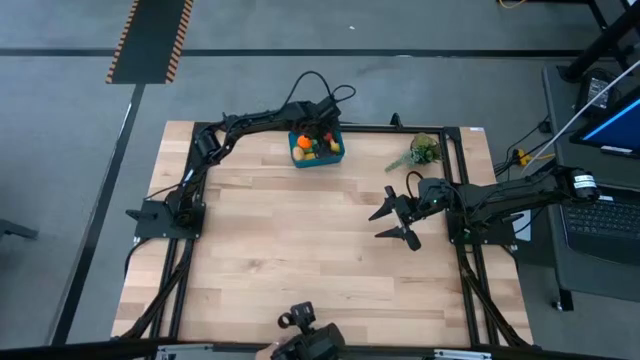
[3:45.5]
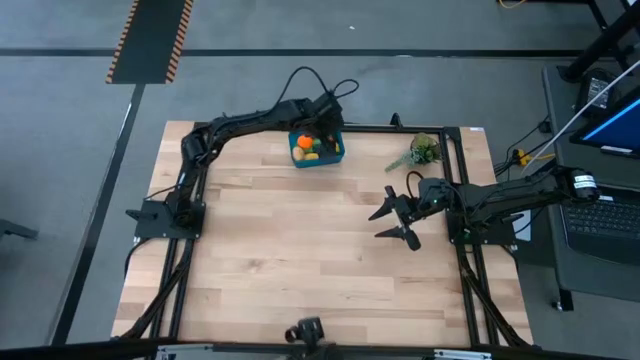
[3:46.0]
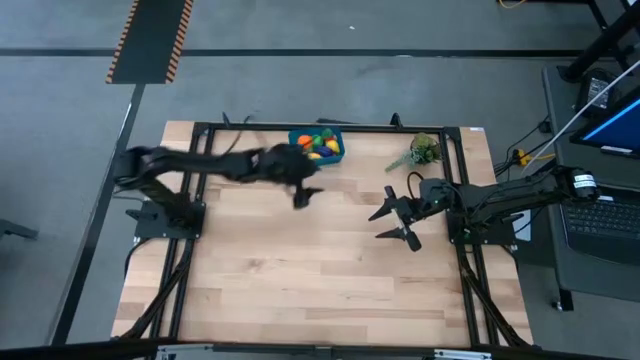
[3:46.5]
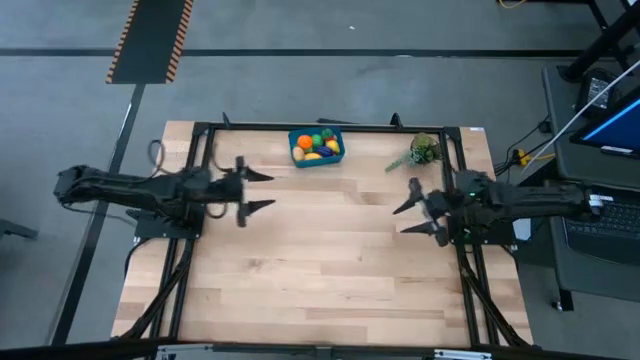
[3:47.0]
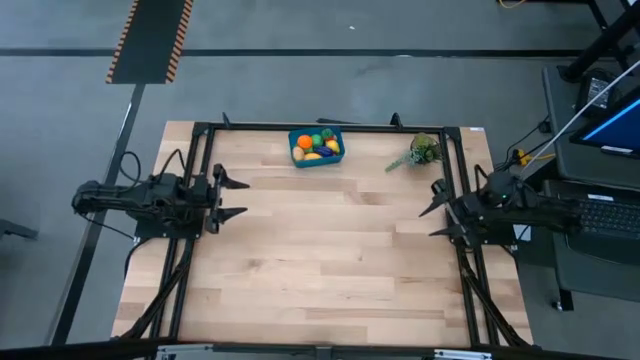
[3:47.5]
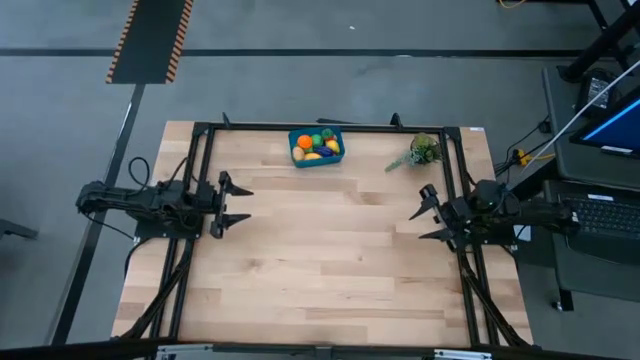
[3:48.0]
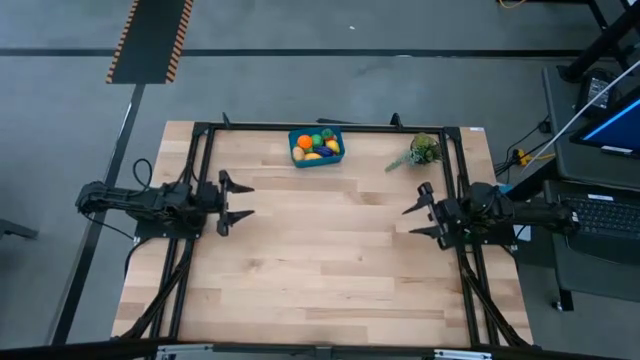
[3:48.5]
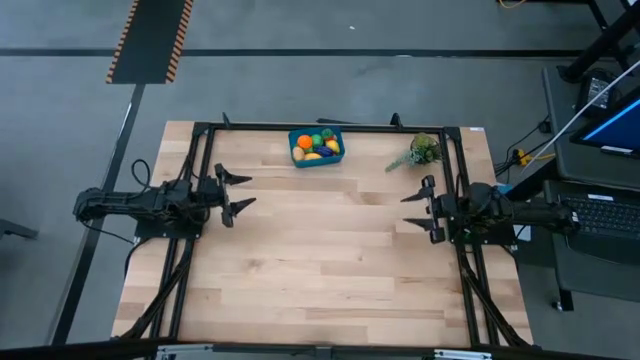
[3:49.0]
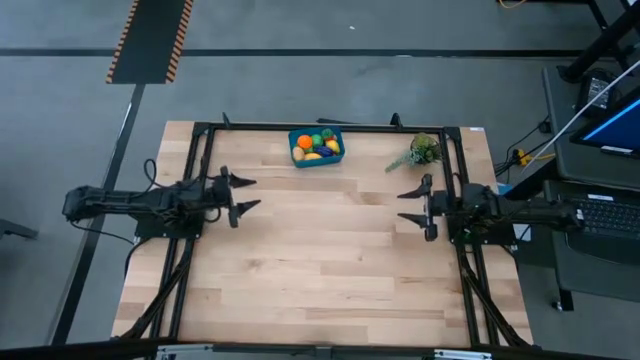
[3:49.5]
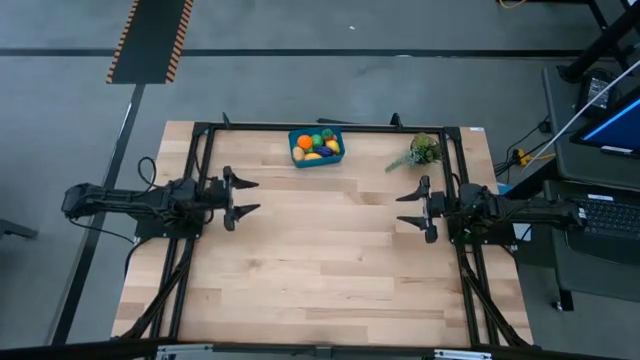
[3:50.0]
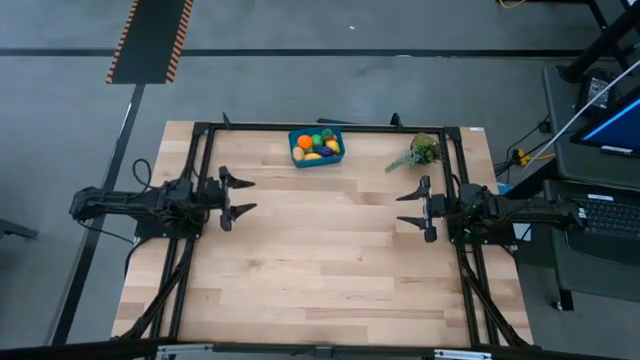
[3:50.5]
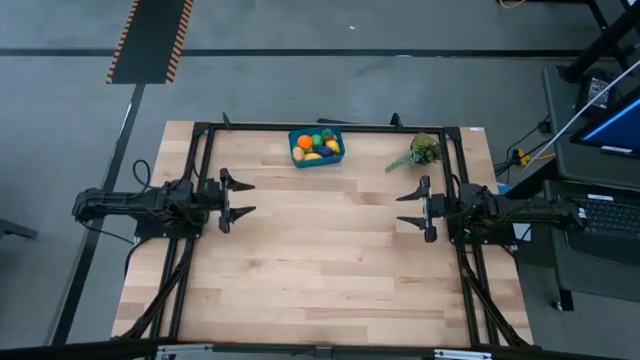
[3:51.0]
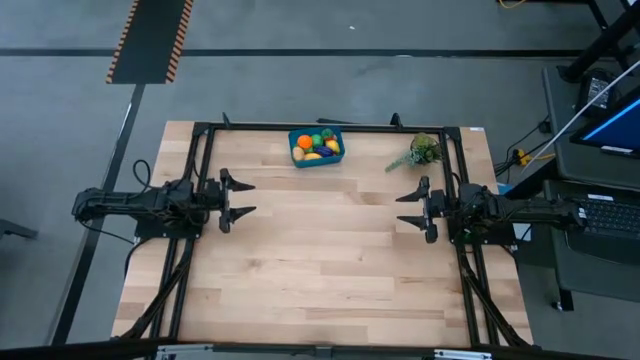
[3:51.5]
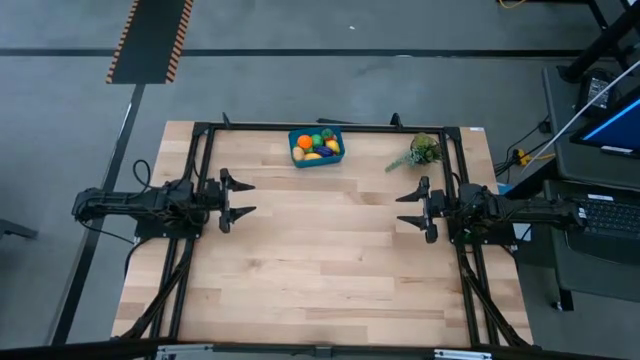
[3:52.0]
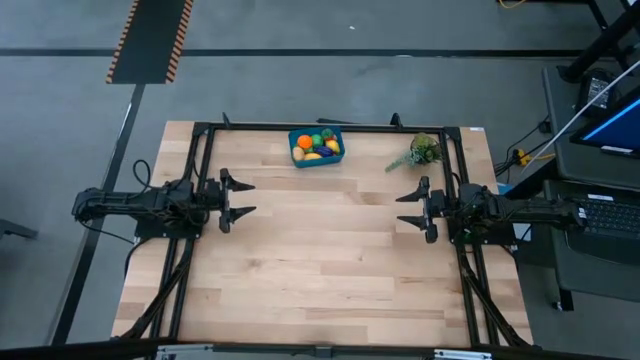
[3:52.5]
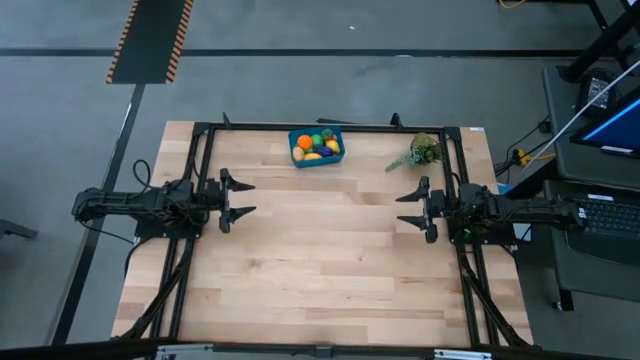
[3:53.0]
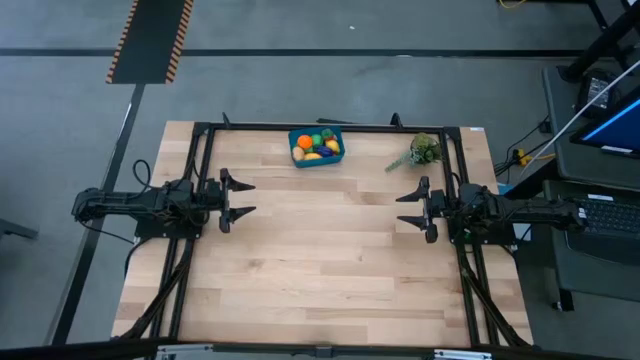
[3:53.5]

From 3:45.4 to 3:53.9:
Task: Pick and placing Produce into tupperware
Return to Home Position

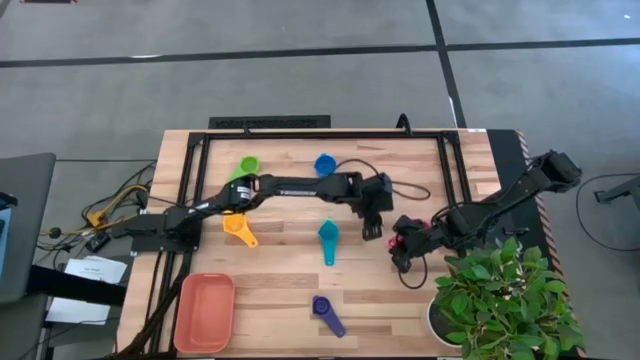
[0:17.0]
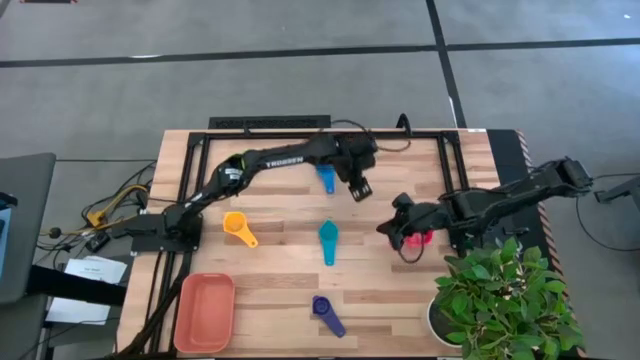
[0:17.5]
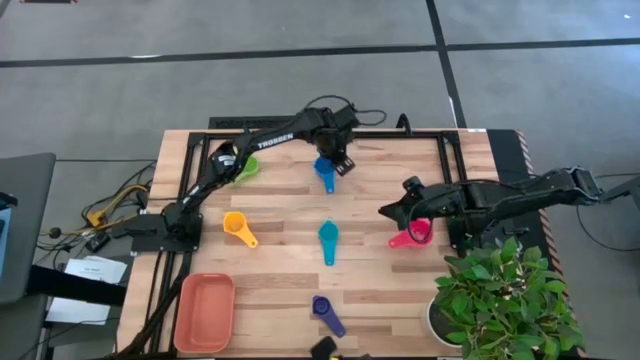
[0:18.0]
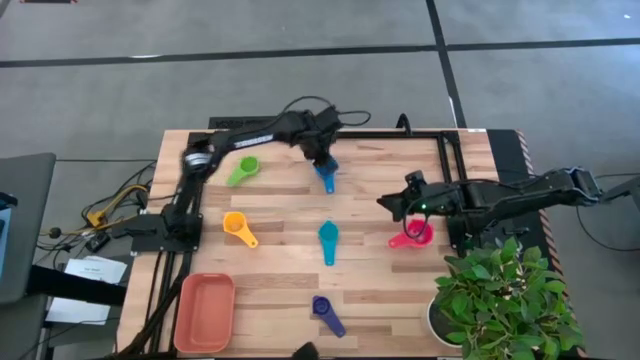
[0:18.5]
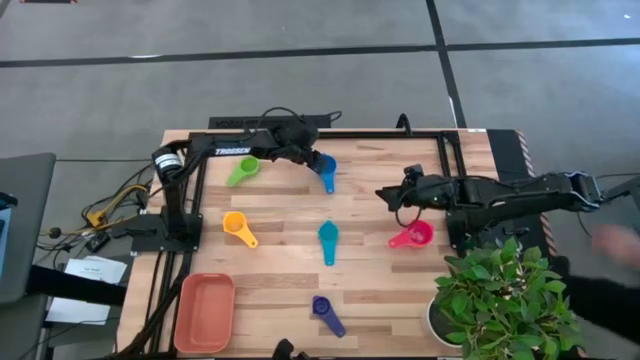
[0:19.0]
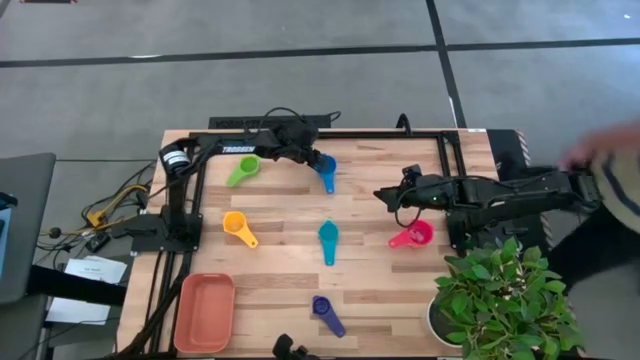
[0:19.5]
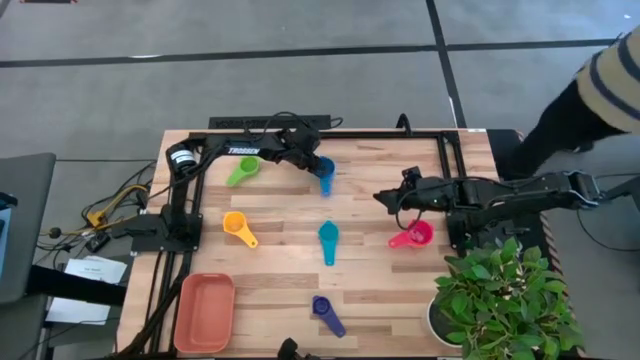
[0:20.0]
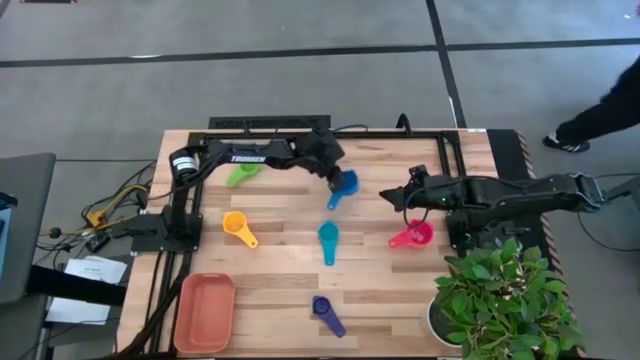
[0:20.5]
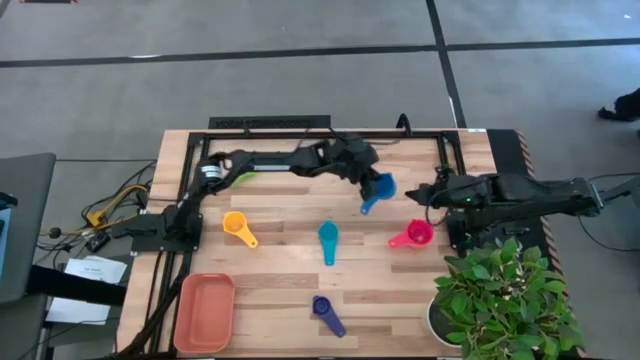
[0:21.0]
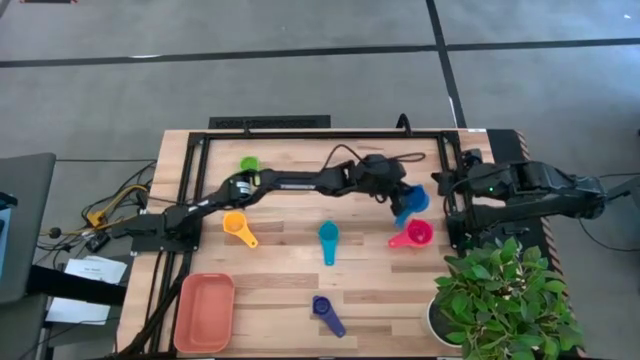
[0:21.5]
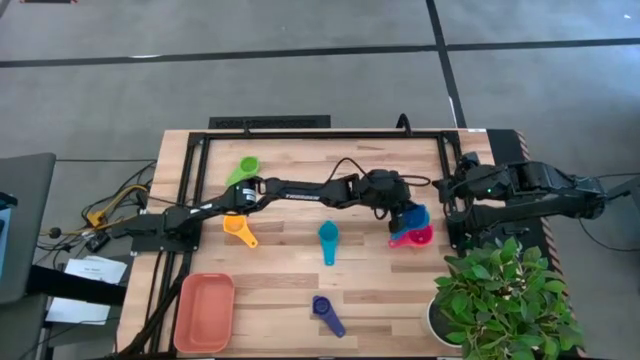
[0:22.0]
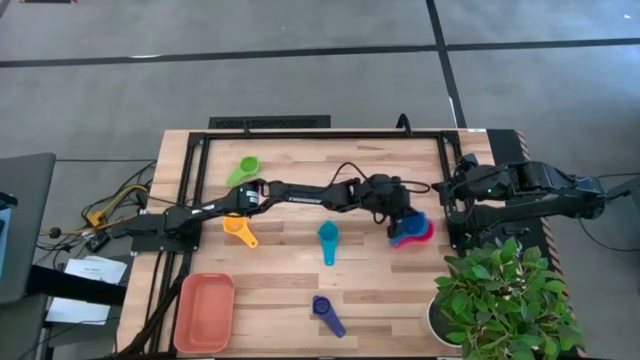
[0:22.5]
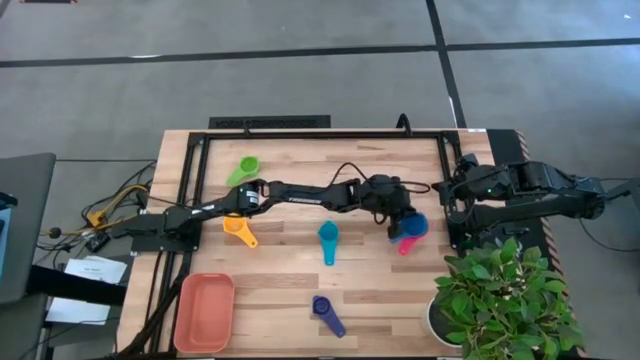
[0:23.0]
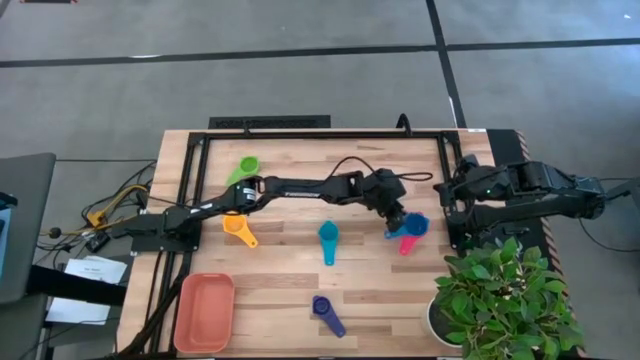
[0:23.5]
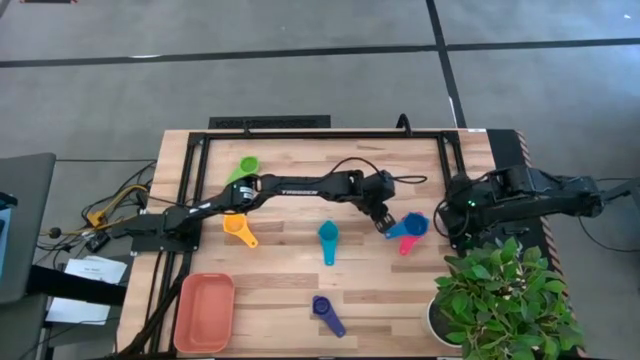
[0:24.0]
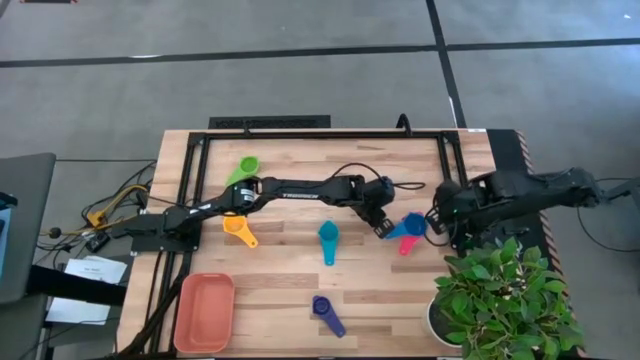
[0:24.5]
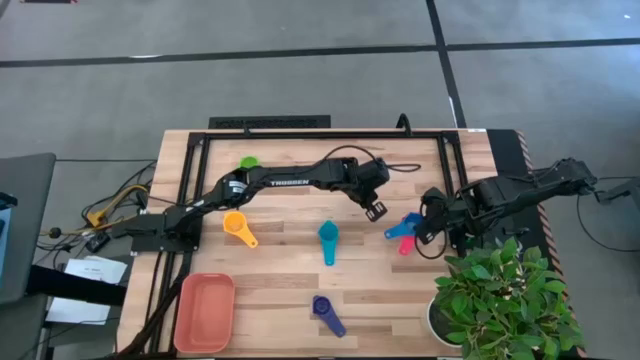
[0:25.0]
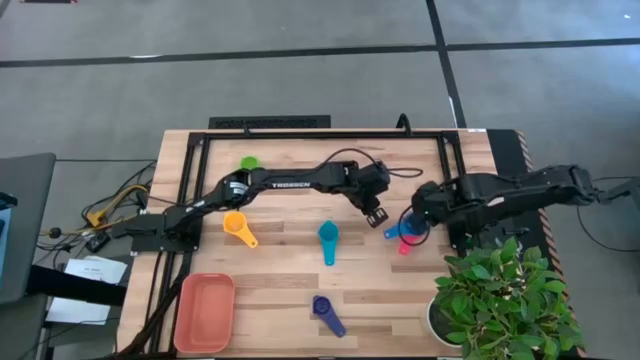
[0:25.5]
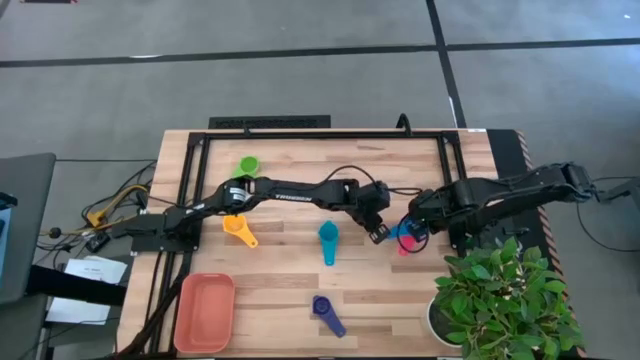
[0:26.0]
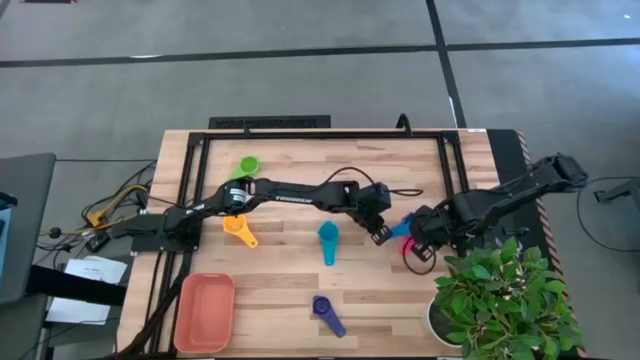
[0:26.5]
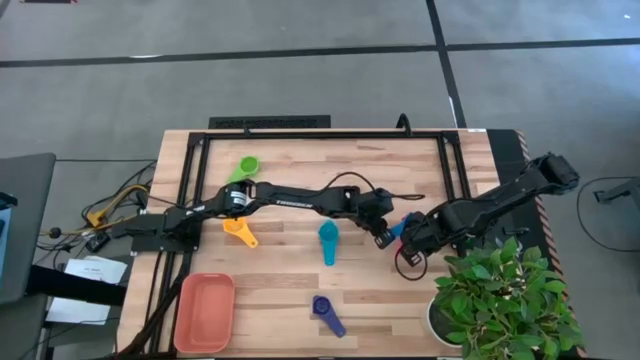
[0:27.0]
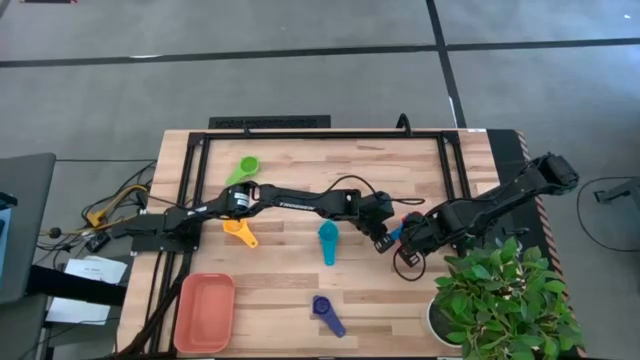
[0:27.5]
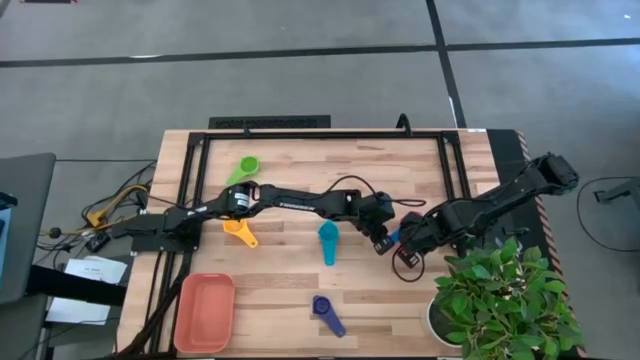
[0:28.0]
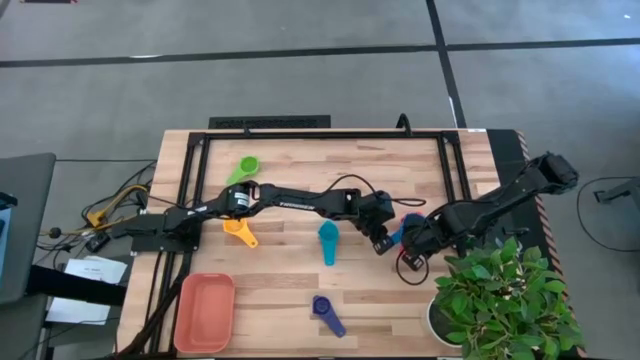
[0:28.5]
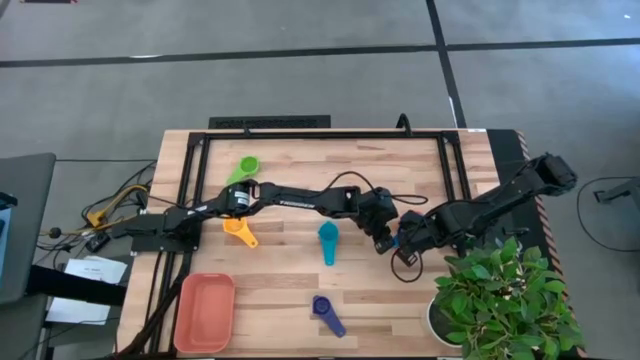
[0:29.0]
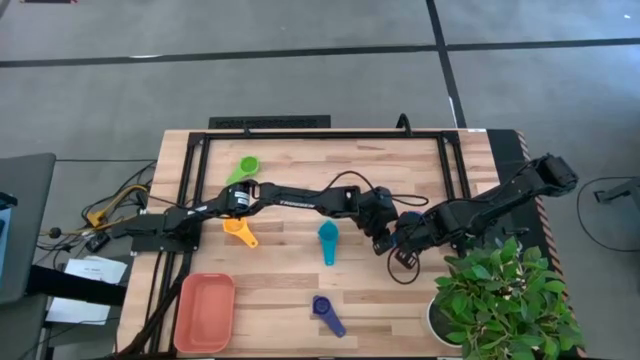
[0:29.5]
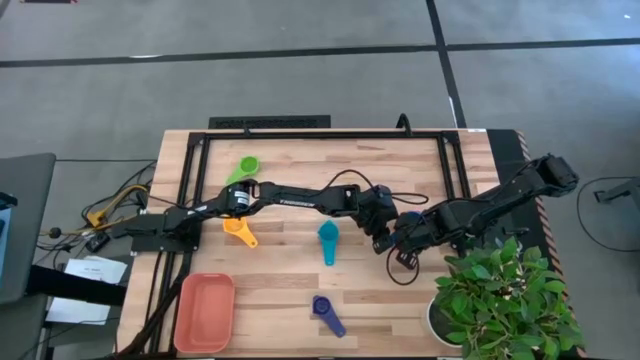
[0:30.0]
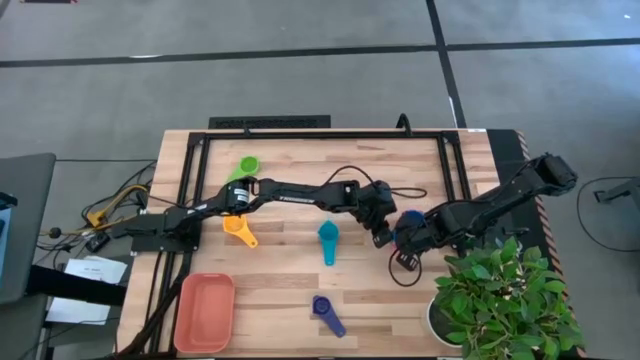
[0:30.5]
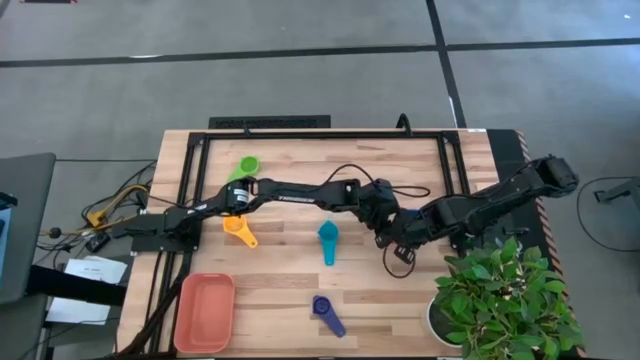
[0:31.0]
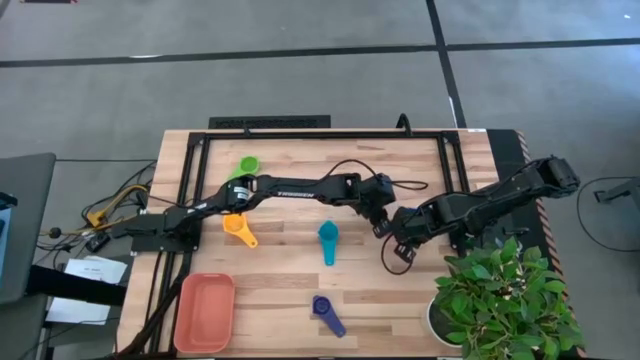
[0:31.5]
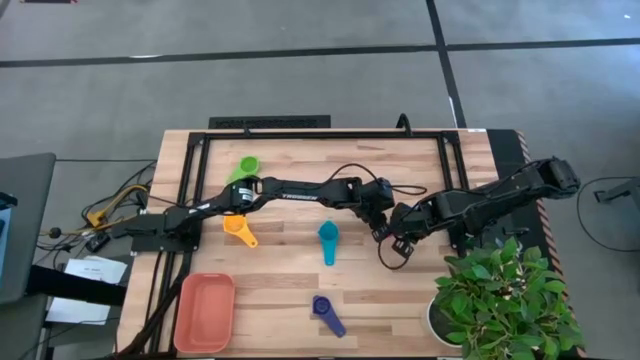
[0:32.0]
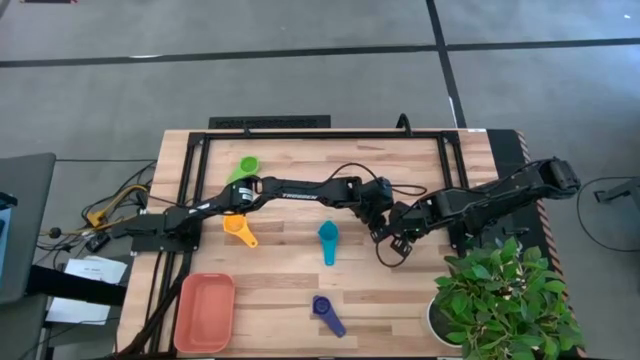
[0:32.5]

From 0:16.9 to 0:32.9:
Task: Nest measuring cups in basket
Stack the blue measuring cup on top of the pink measuring cup
